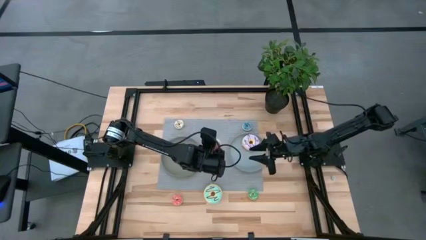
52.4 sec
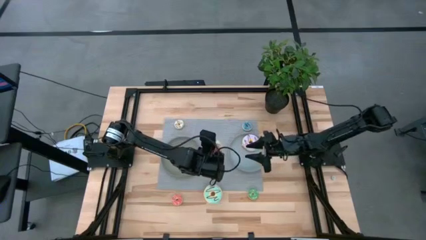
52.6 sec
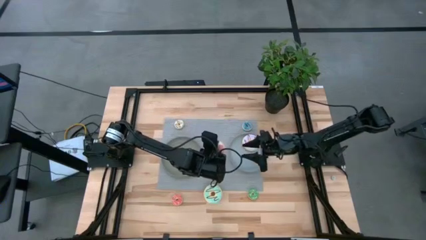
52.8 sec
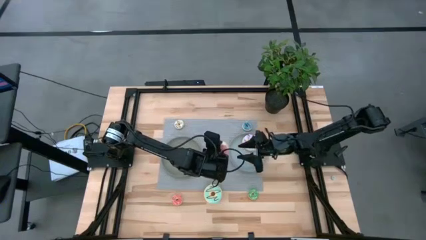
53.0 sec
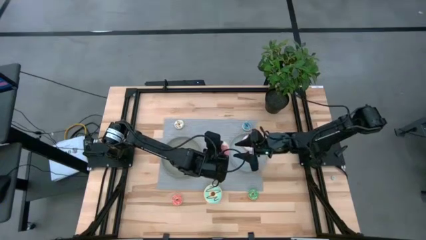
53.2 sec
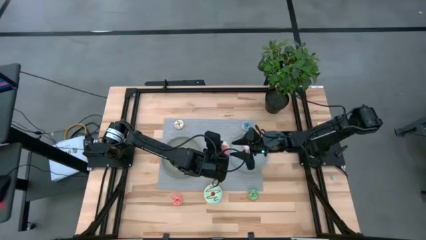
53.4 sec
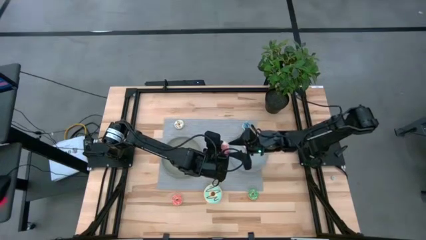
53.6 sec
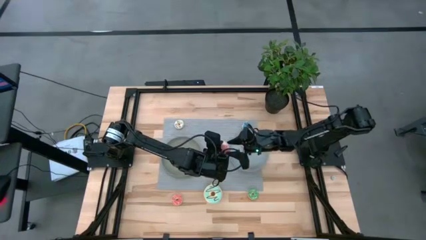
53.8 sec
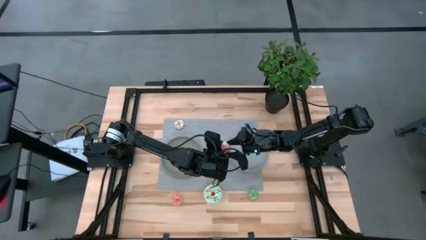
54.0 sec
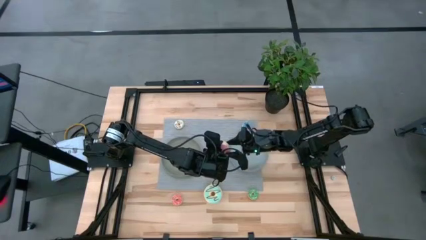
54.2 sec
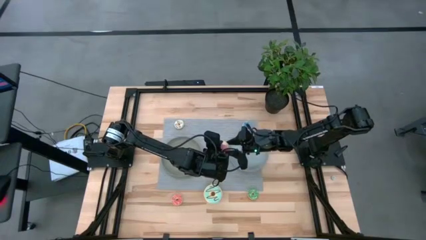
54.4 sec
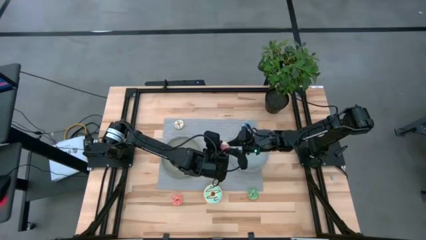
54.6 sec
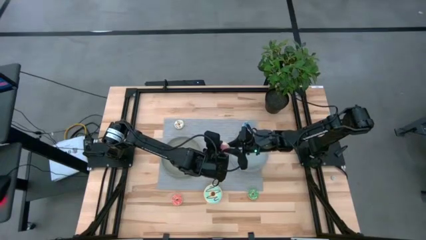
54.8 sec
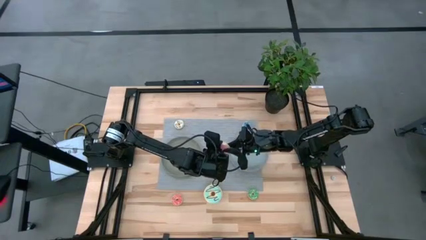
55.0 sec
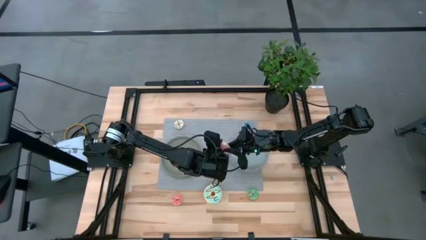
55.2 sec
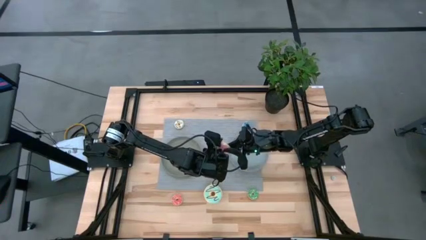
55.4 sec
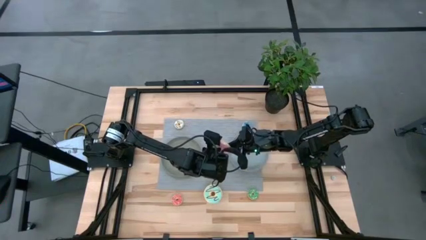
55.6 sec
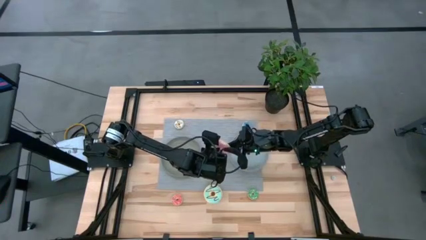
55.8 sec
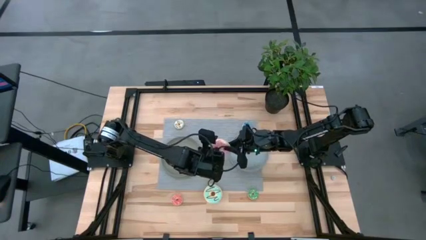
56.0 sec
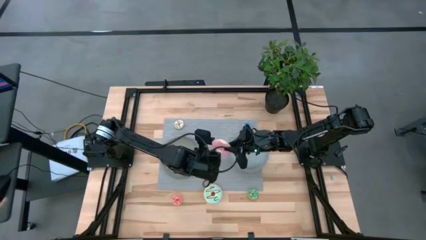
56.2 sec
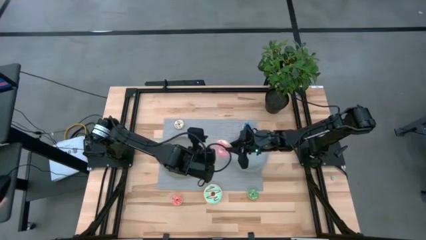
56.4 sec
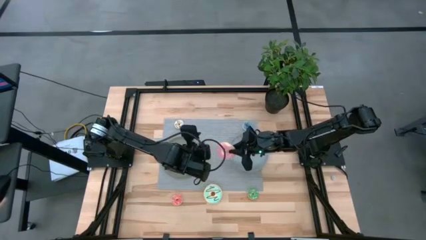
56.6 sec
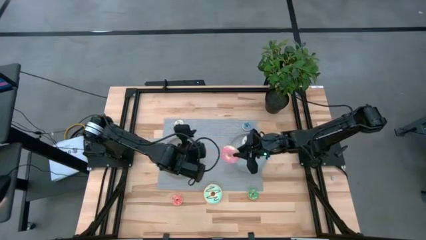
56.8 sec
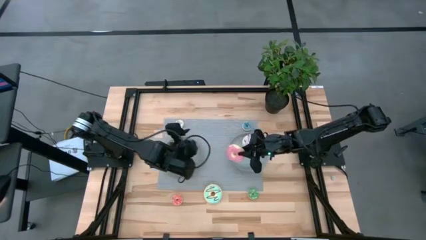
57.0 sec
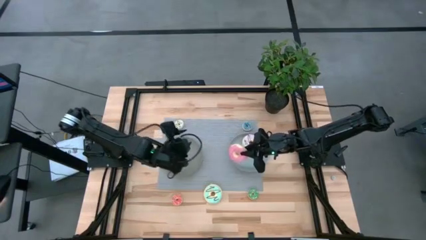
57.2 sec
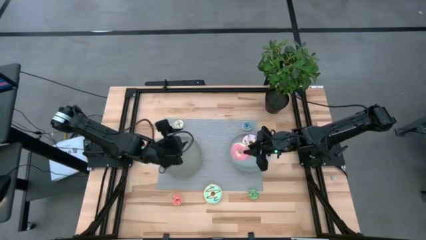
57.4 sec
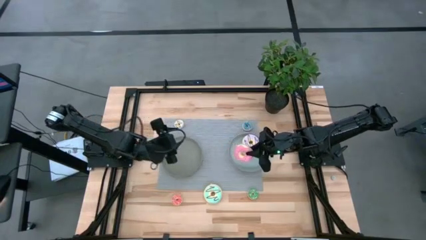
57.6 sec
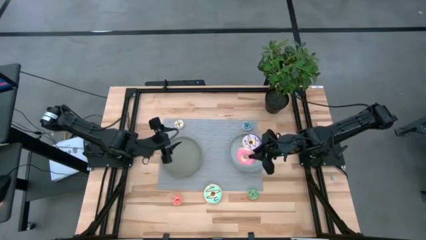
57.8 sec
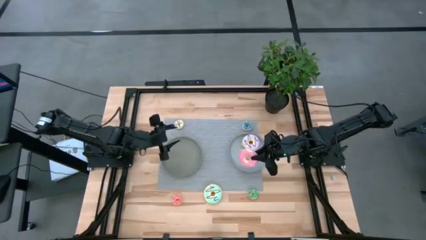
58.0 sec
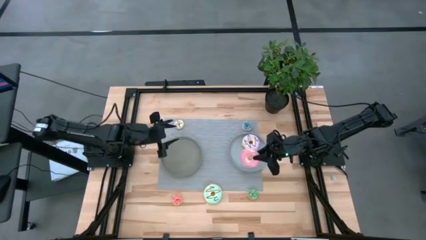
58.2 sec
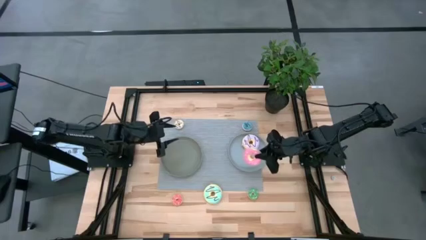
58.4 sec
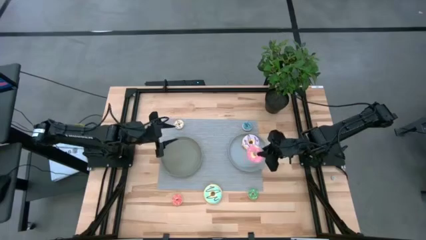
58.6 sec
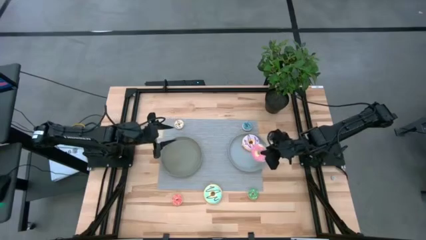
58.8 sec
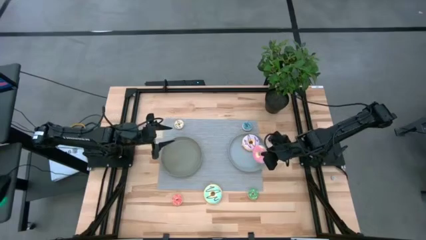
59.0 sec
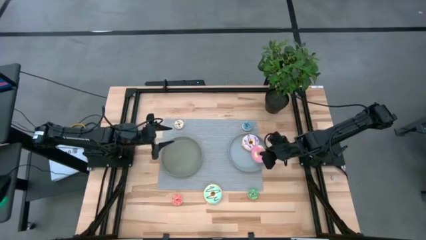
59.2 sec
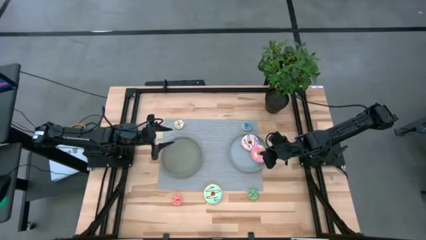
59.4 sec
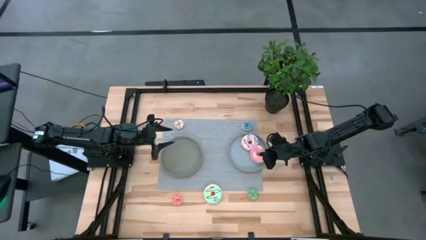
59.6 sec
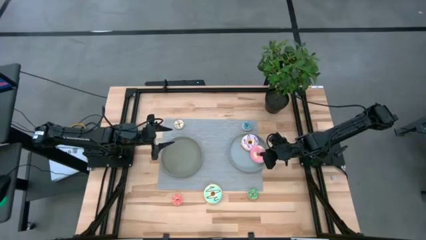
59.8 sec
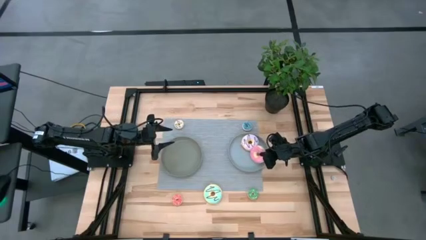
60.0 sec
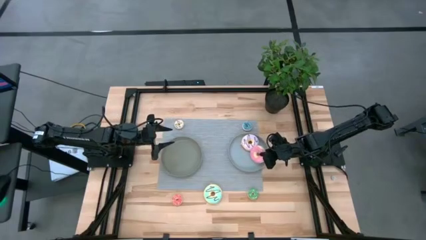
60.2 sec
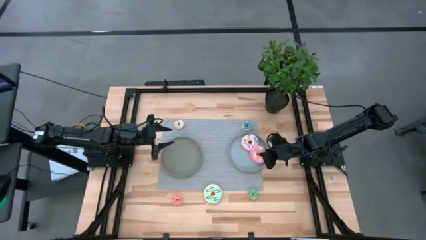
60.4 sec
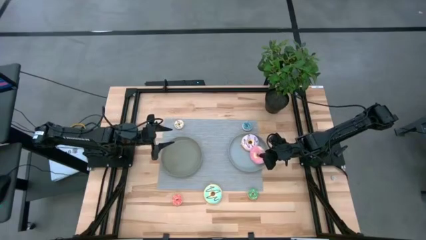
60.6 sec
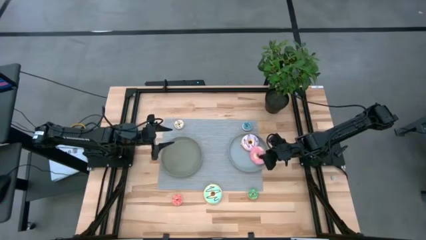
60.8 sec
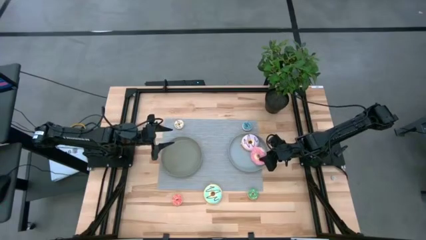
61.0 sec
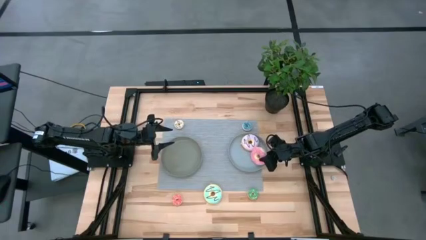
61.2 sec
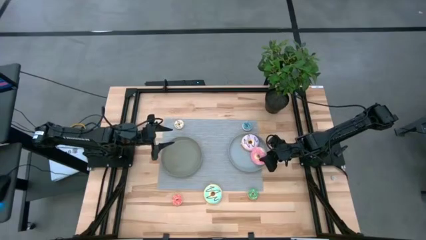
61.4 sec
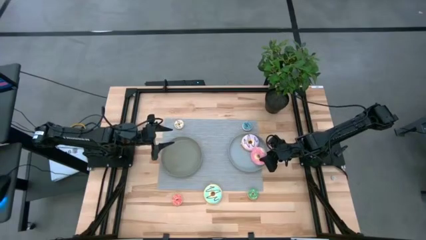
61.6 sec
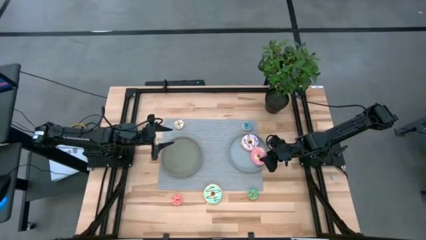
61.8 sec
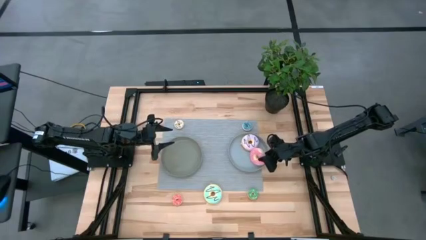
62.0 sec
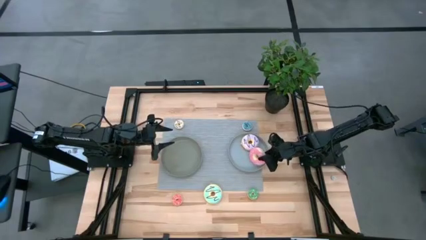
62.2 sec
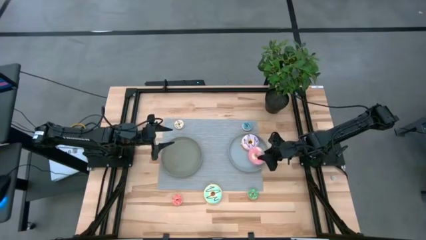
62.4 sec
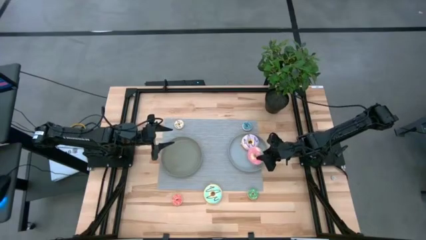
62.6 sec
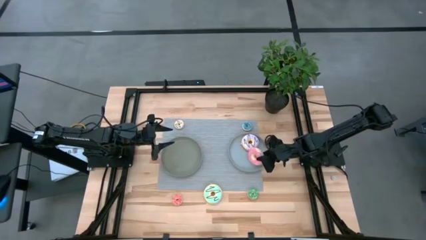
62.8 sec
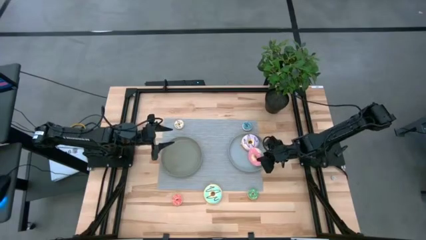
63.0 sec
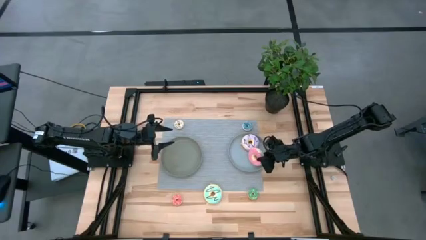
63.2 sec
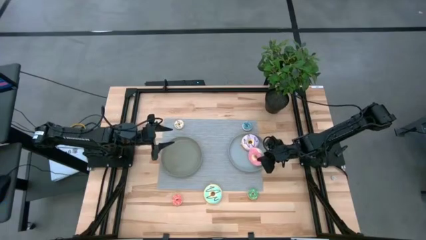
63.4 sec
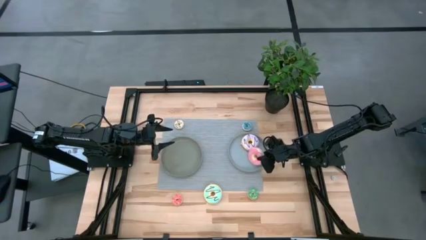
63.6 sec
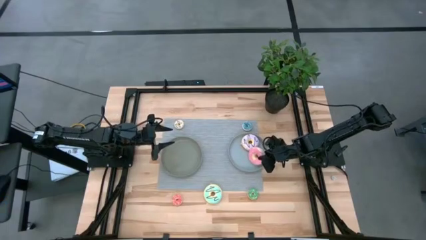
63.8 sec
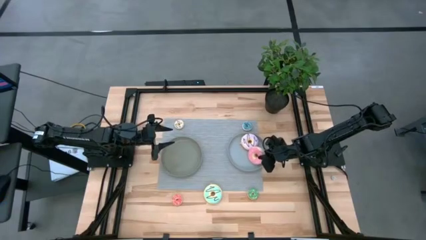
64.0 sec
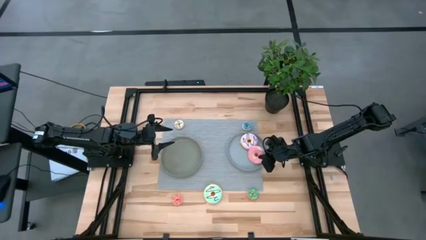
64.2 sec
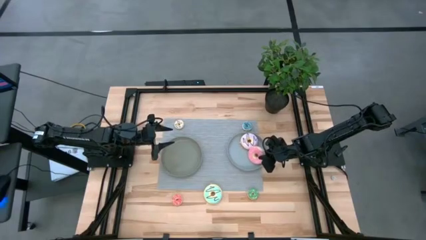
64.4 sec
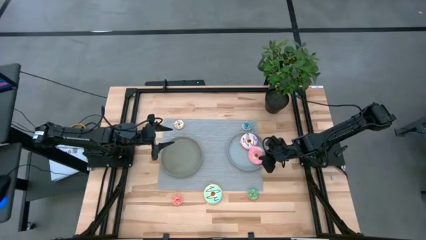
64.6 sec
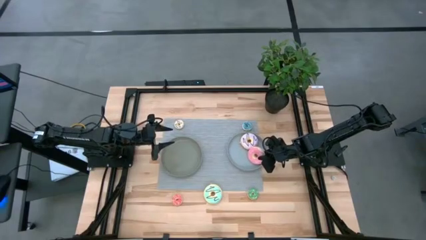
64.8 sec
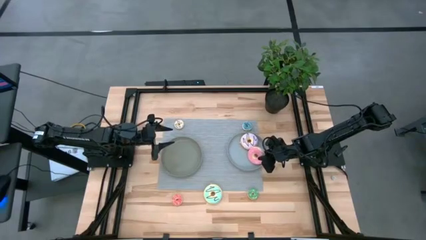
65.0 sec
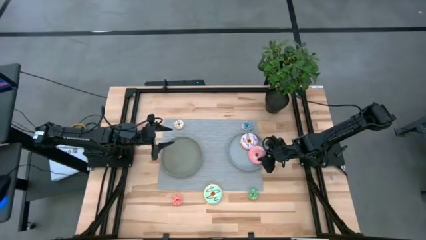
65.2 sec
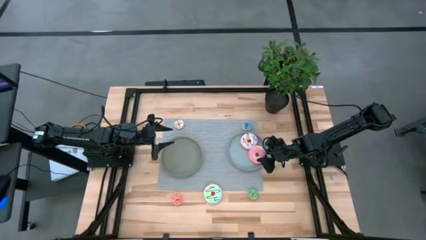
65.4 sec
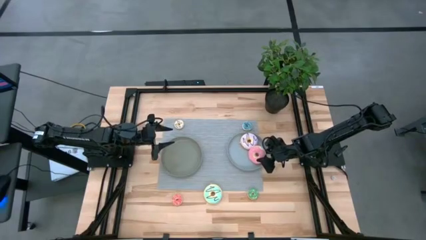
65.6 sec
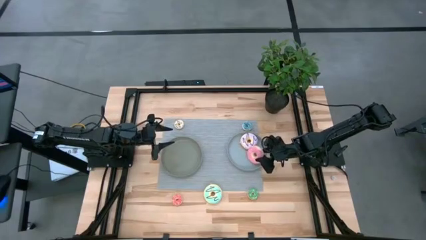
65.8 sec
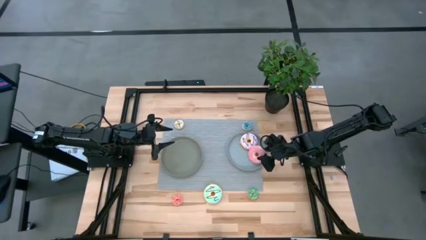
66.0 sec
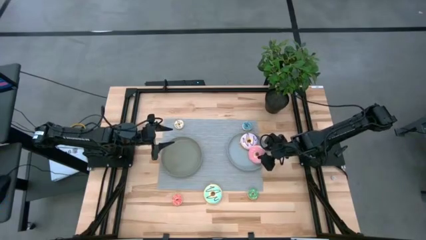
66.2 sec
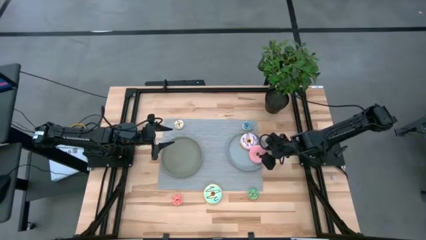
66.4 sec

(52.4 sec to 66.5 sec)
Task: Pick & Place donuts
Put the big pink donut into the blue plate
